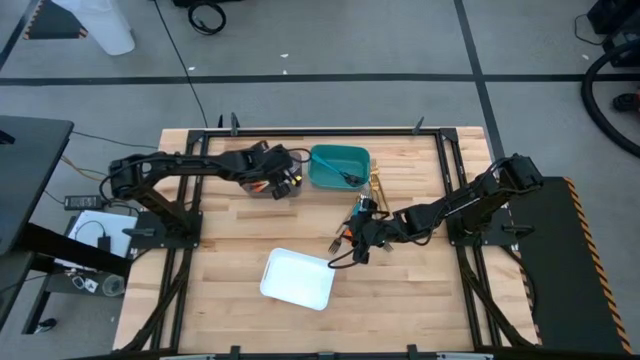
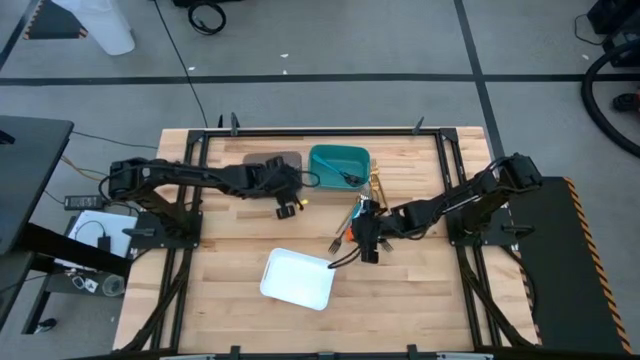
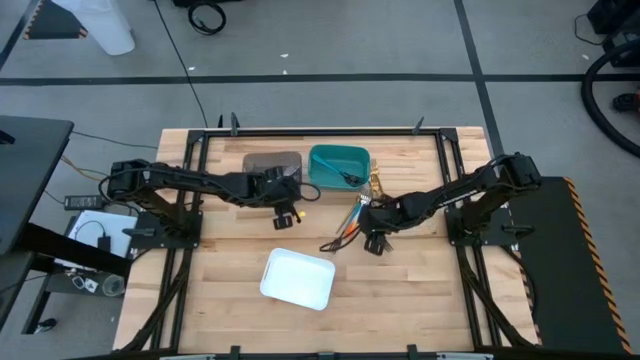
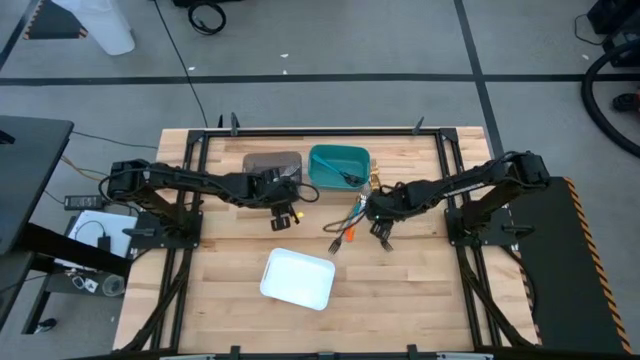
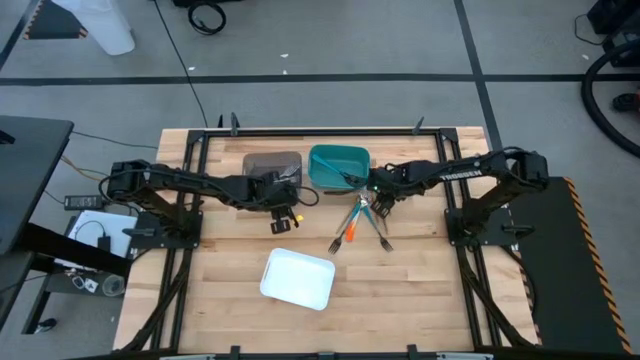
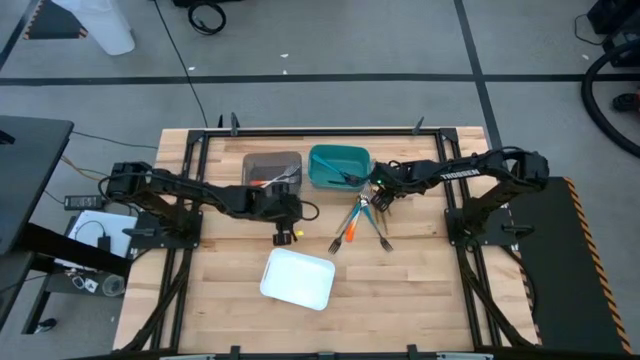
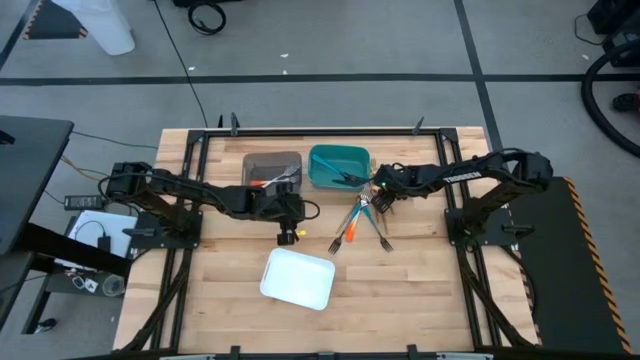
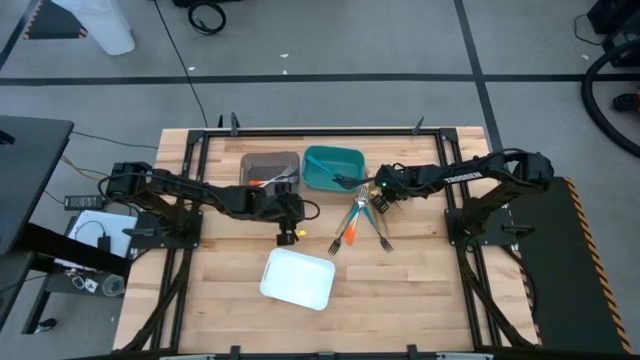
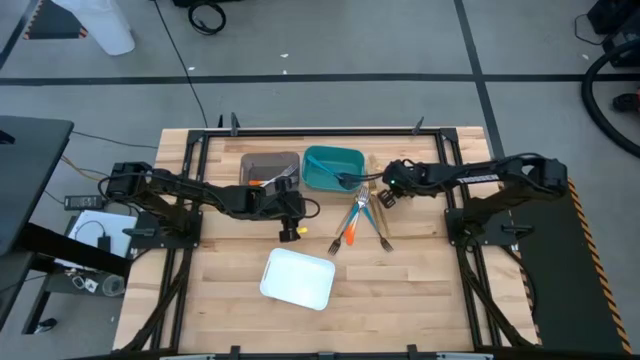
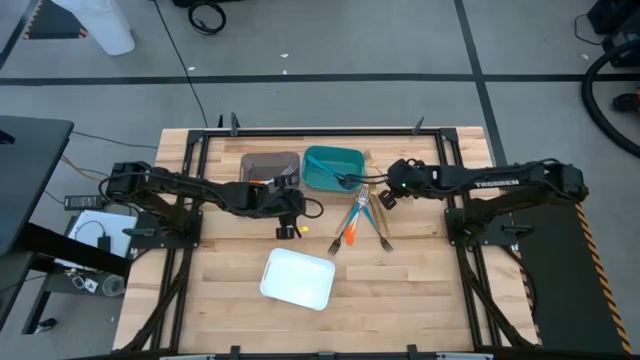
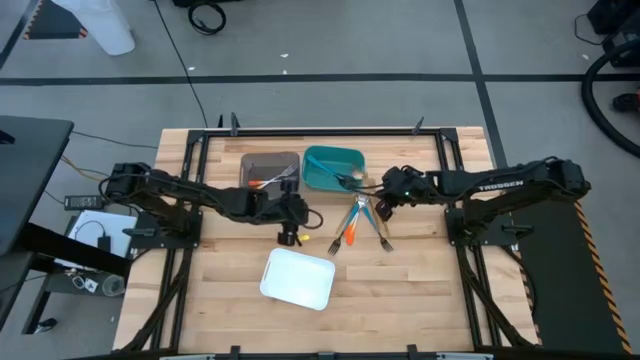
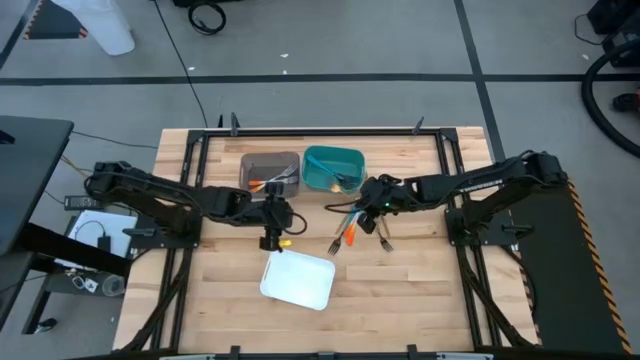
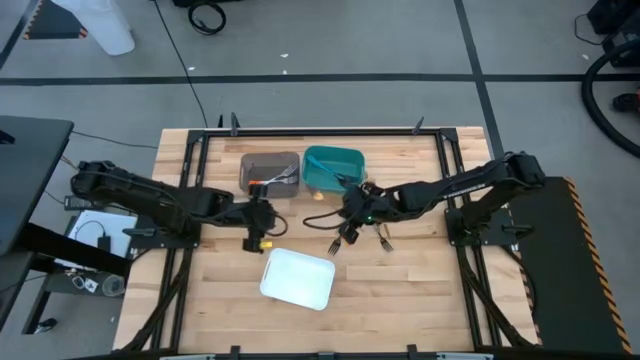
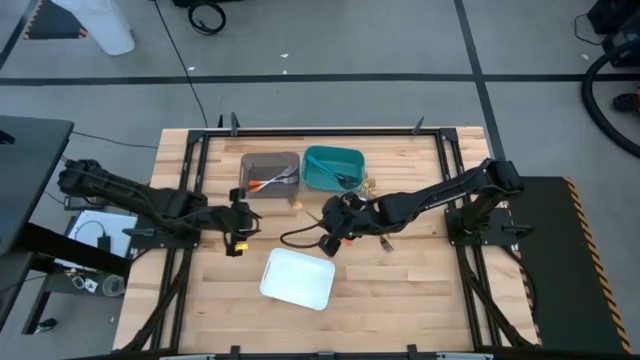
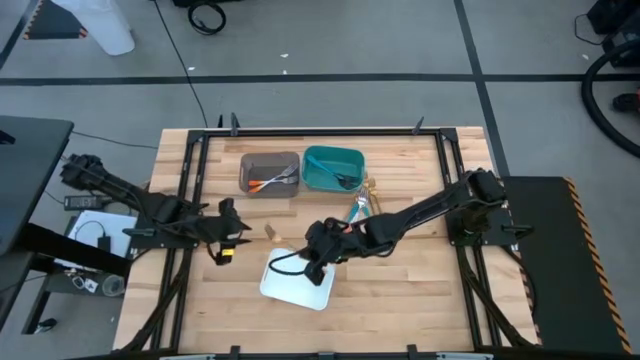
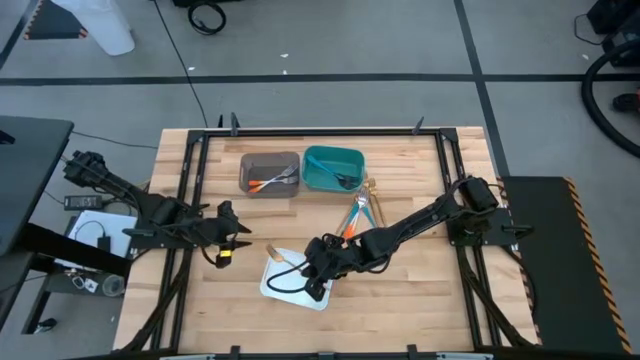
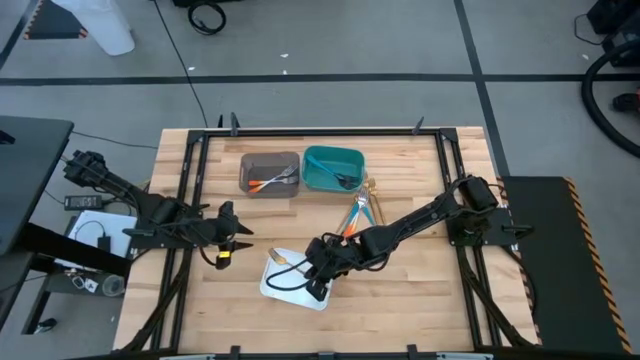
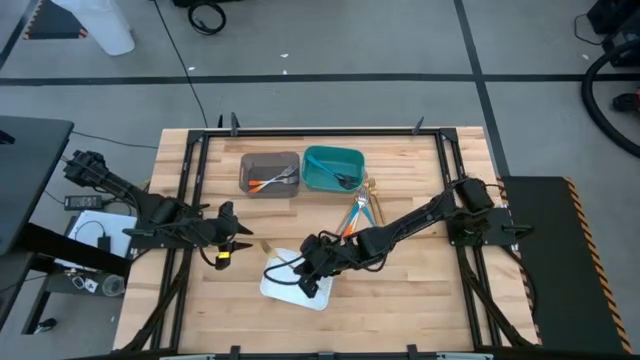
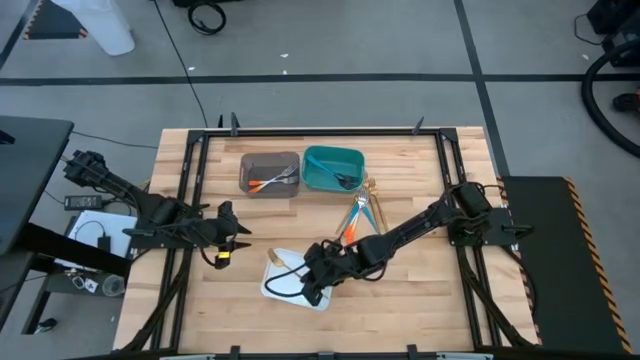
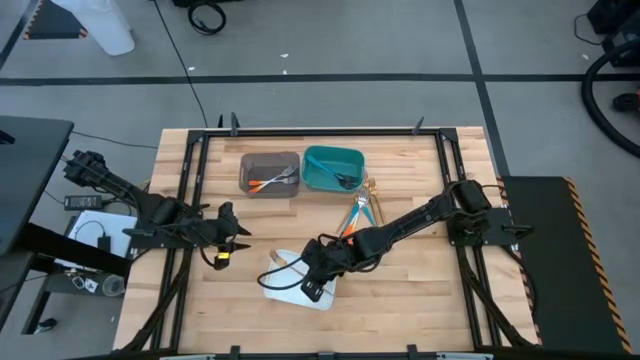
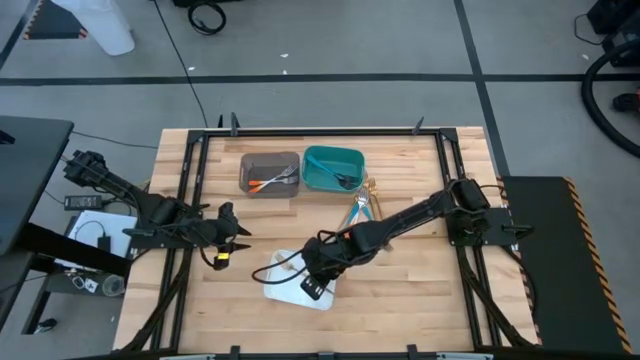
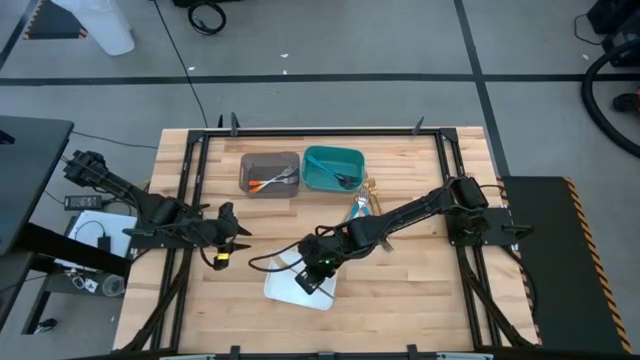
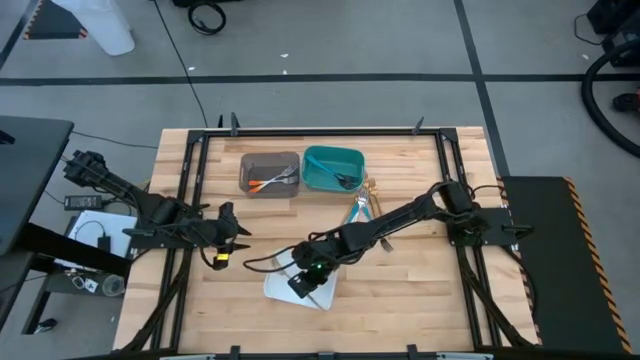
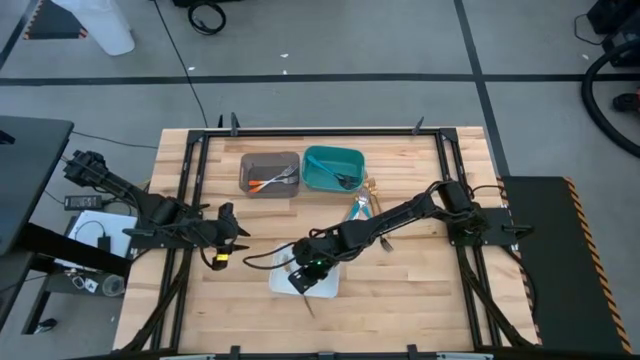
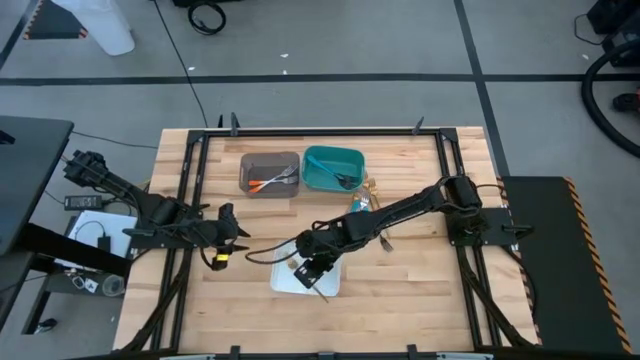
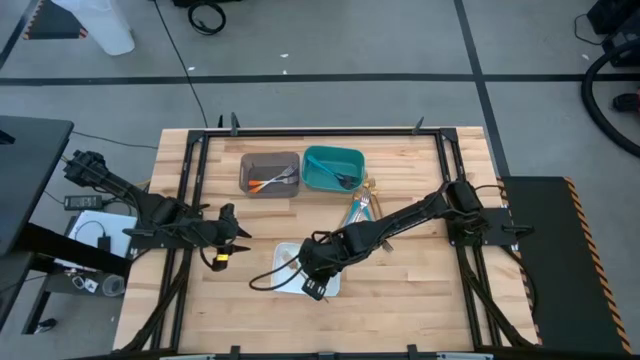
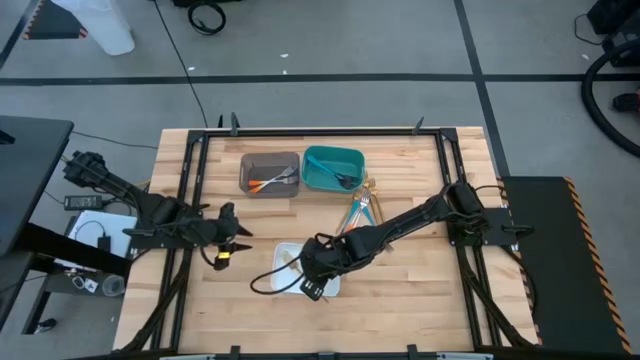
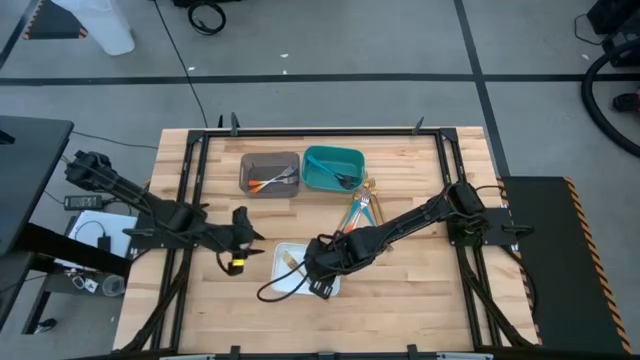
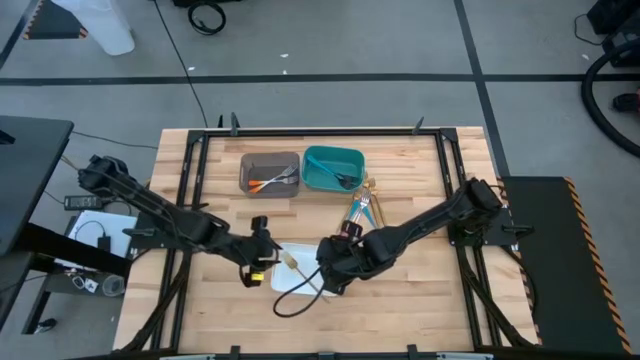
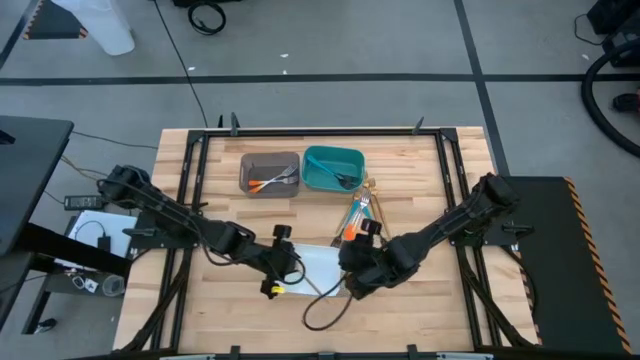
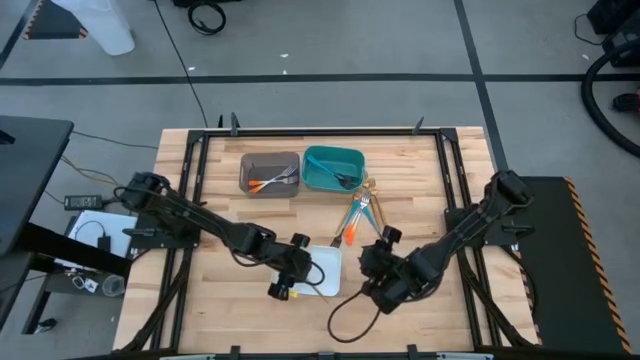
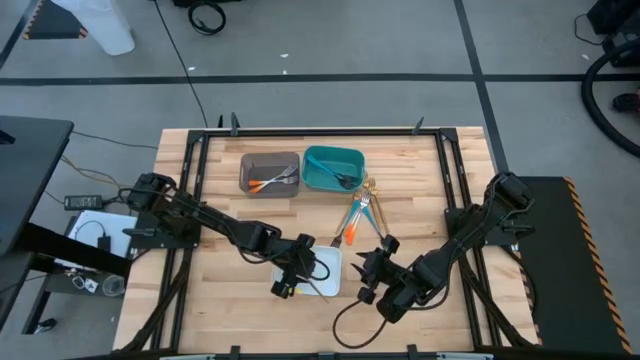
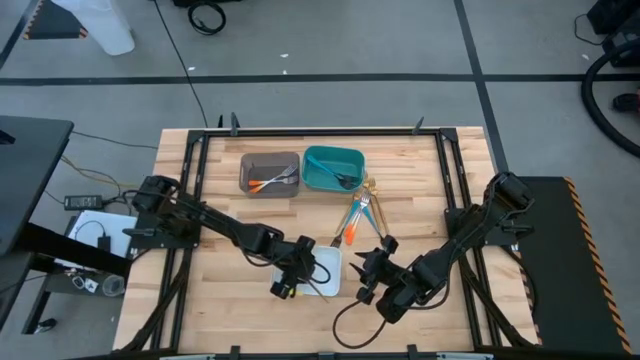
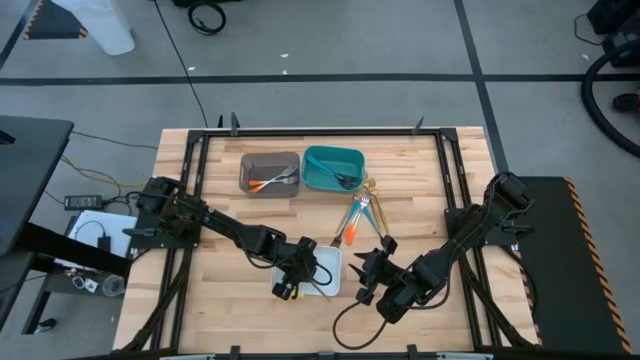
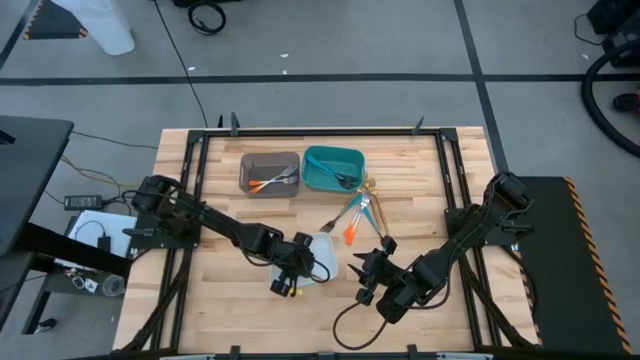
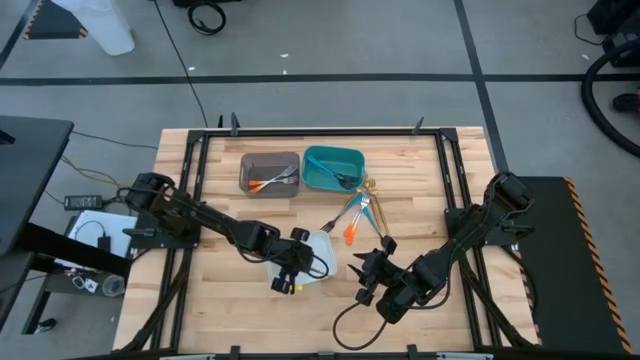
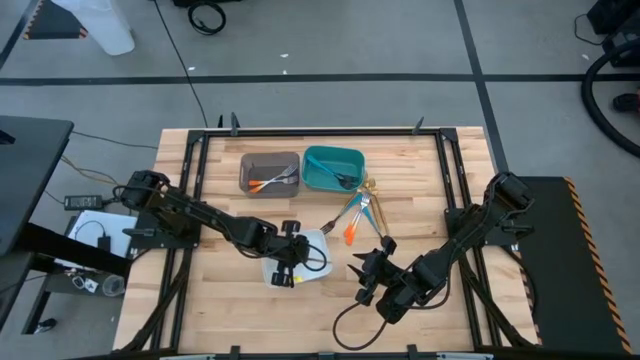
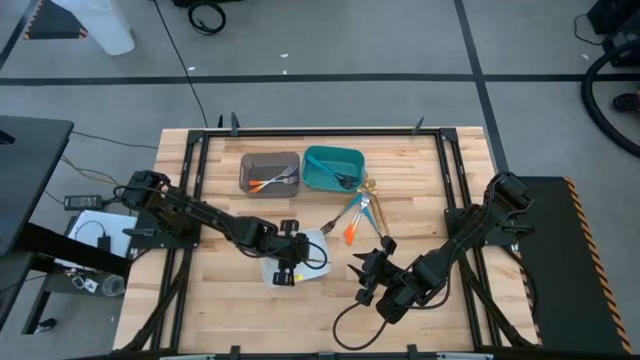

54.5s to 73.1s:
Task: Sort silverware by color (type)
Put the gold fork into the white bin

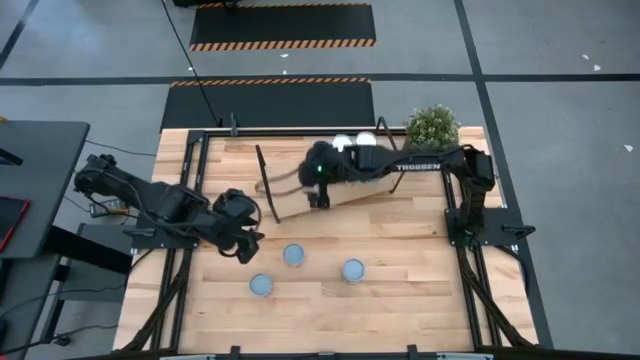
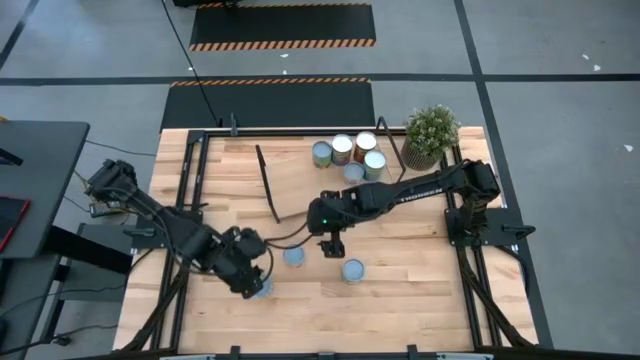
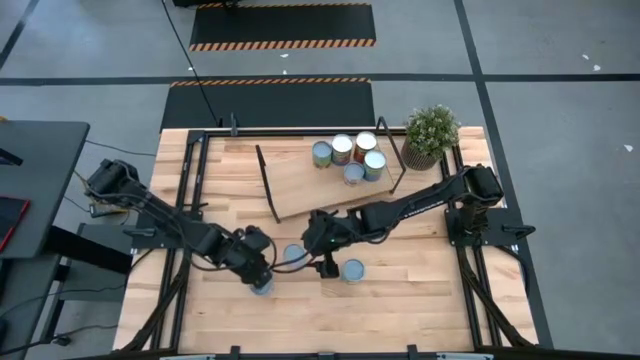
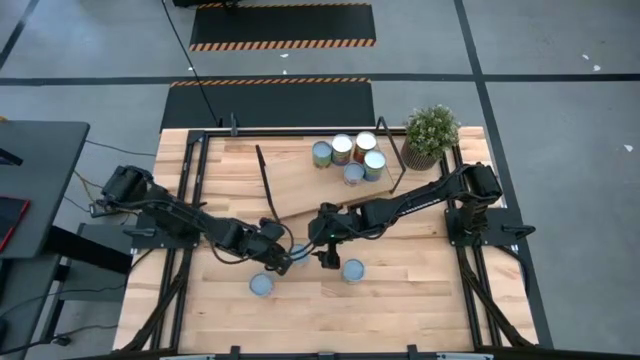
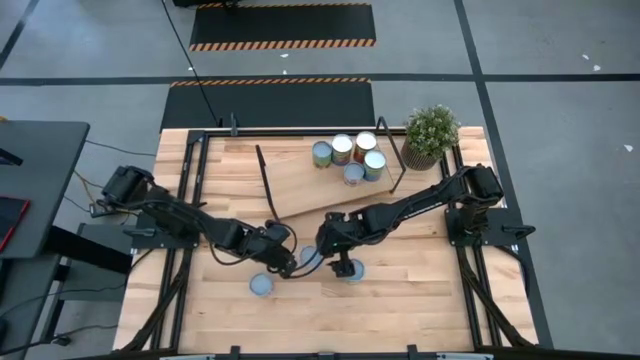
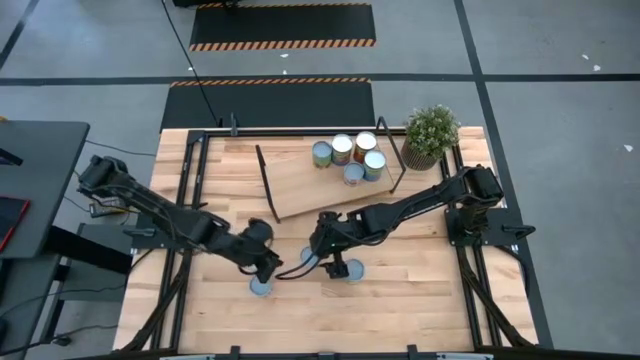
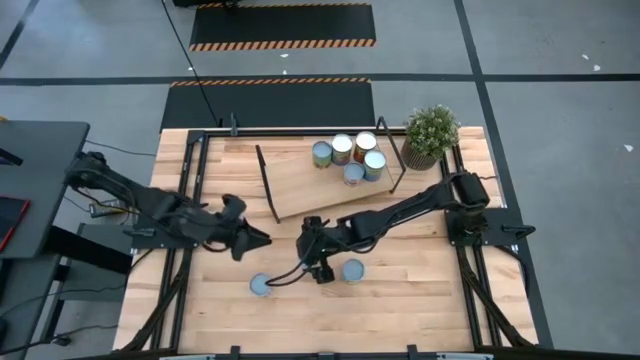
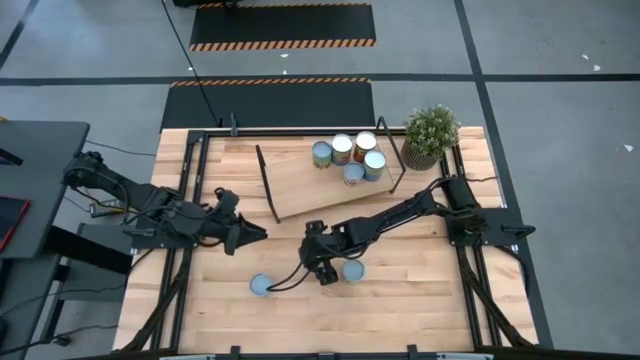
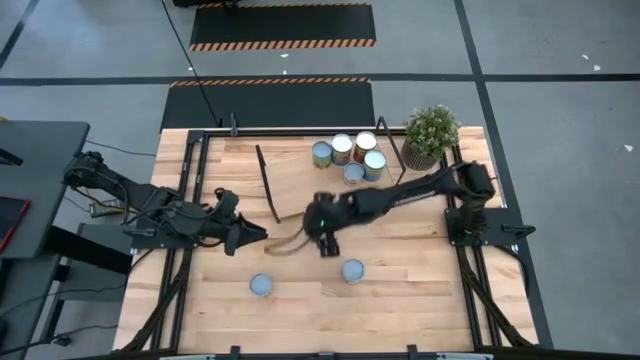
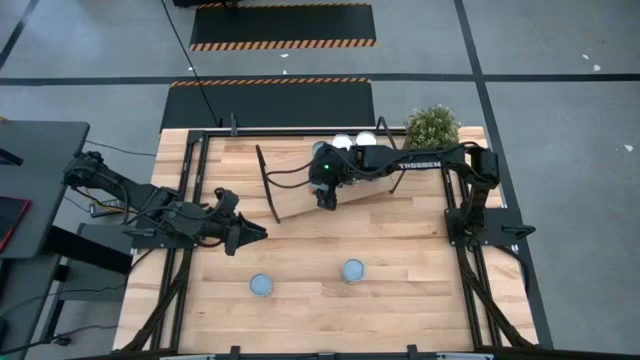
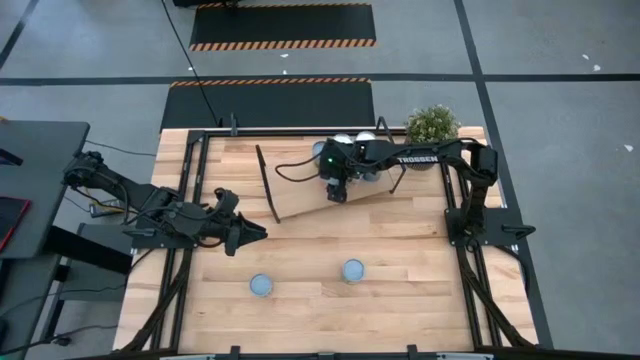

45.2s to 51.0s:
Task: Pick and place cans onto a shelf
Put the canned sausage on the shelf
